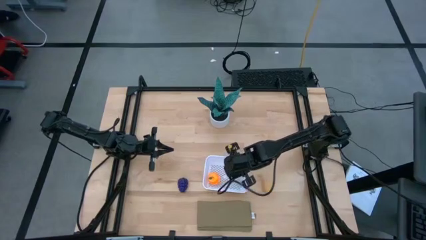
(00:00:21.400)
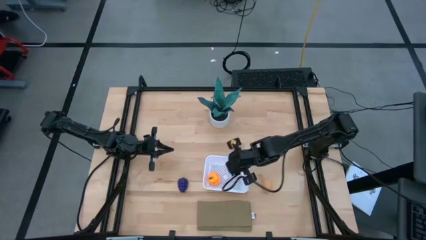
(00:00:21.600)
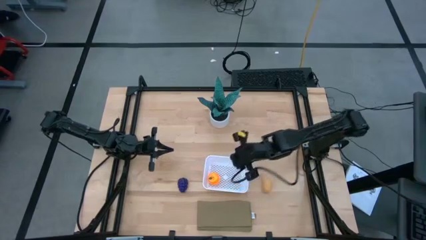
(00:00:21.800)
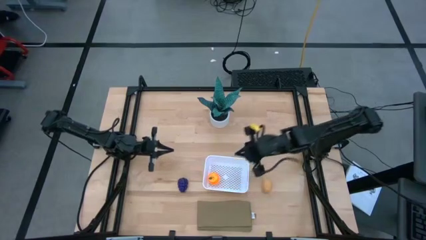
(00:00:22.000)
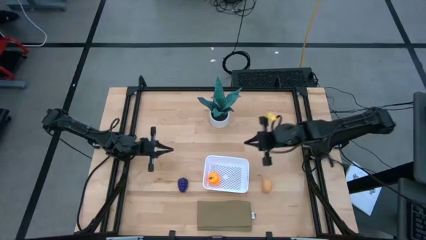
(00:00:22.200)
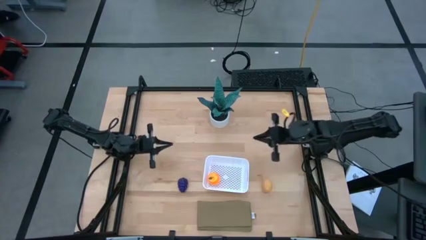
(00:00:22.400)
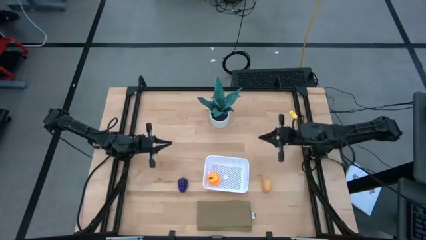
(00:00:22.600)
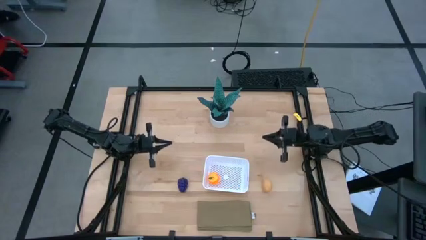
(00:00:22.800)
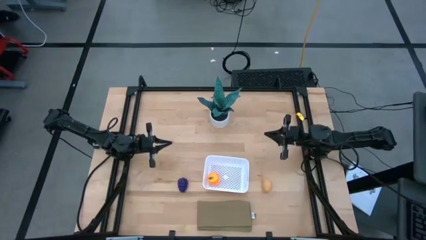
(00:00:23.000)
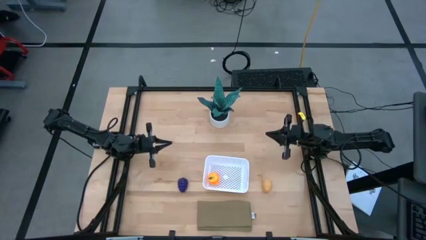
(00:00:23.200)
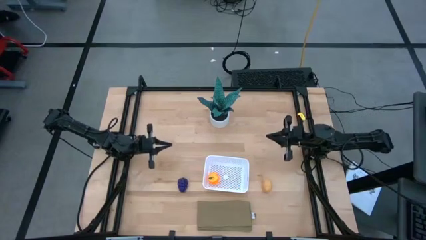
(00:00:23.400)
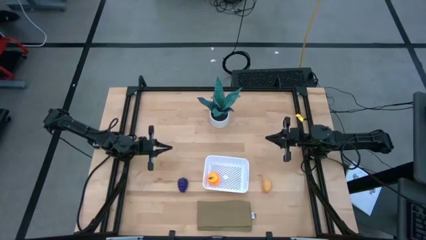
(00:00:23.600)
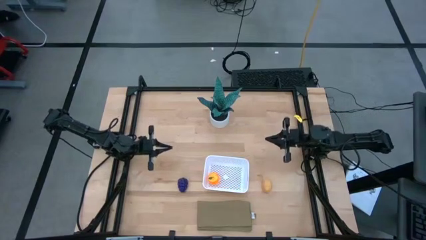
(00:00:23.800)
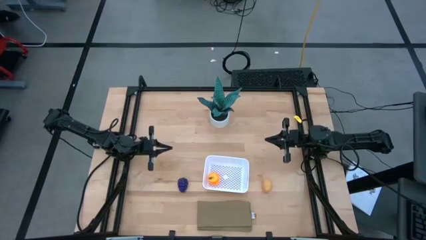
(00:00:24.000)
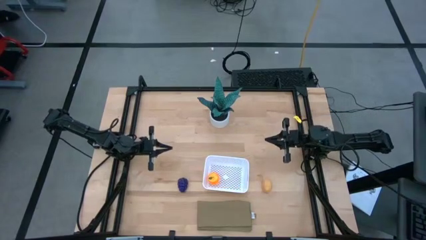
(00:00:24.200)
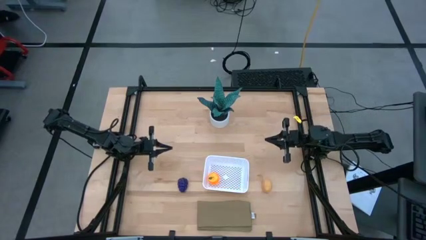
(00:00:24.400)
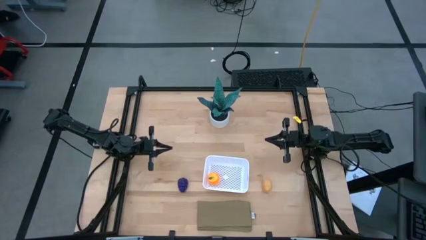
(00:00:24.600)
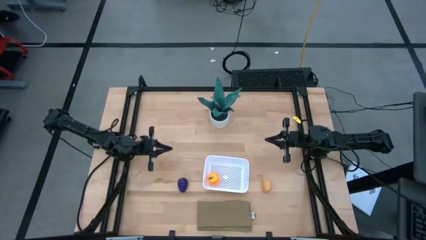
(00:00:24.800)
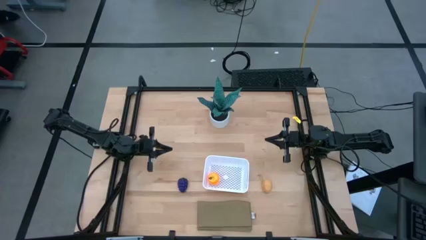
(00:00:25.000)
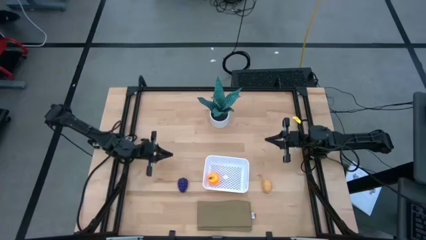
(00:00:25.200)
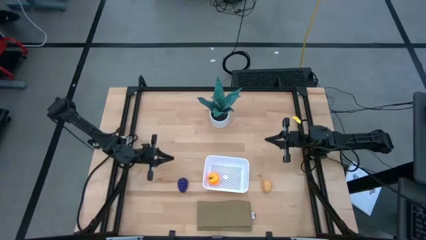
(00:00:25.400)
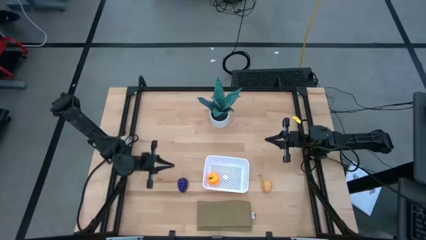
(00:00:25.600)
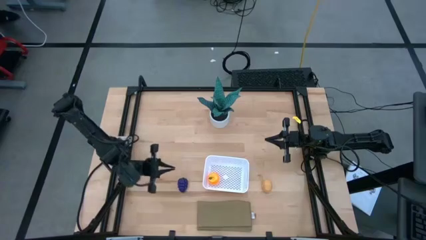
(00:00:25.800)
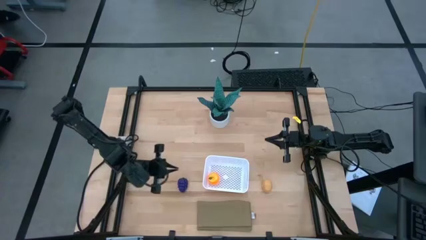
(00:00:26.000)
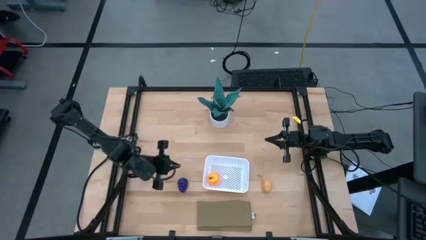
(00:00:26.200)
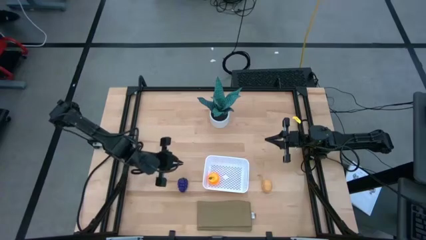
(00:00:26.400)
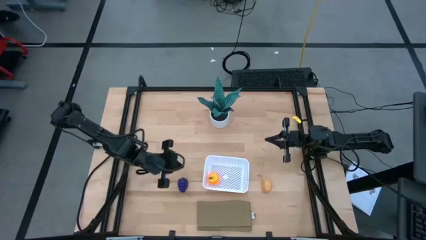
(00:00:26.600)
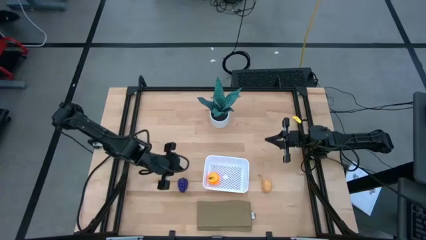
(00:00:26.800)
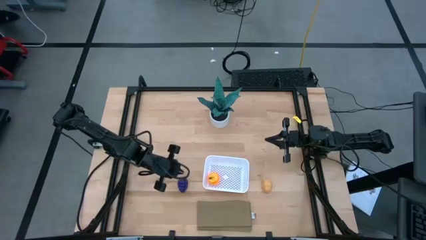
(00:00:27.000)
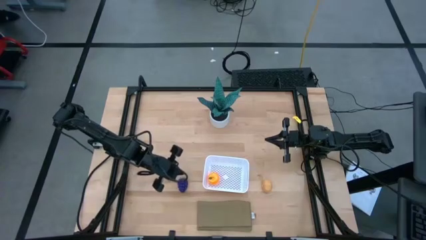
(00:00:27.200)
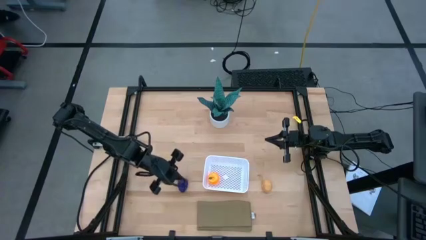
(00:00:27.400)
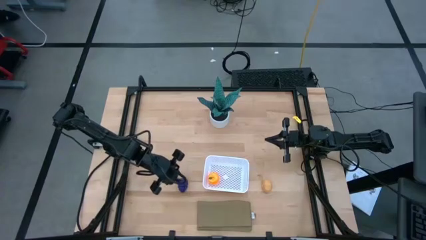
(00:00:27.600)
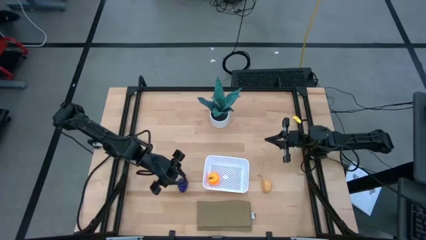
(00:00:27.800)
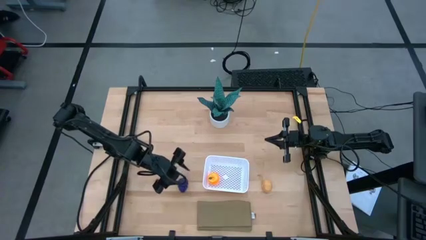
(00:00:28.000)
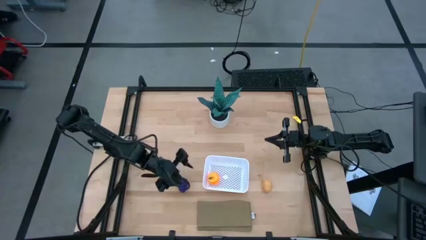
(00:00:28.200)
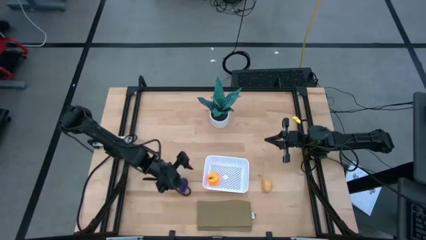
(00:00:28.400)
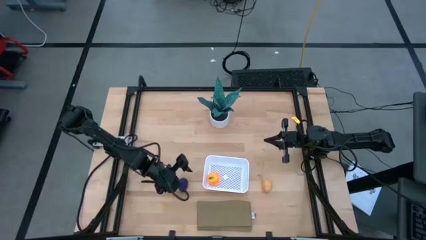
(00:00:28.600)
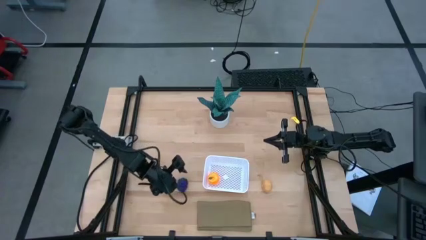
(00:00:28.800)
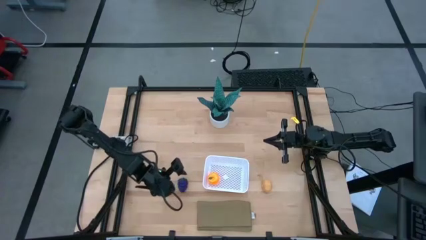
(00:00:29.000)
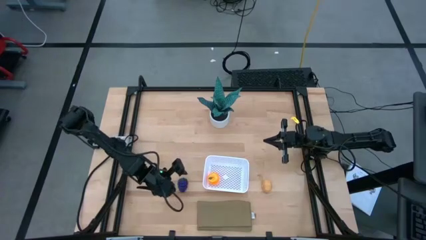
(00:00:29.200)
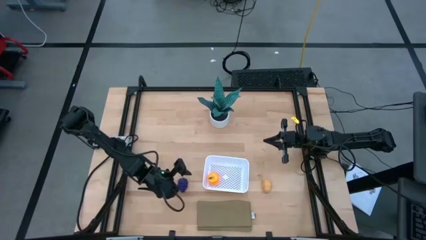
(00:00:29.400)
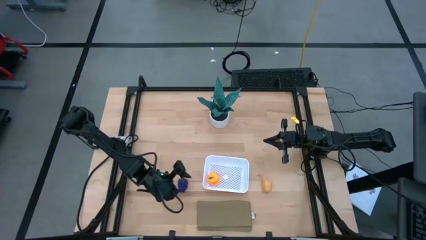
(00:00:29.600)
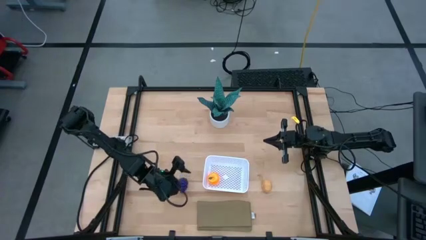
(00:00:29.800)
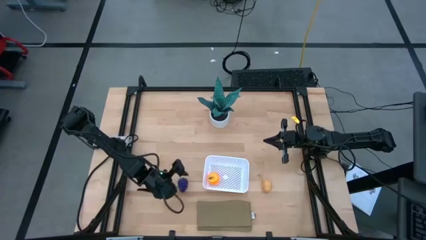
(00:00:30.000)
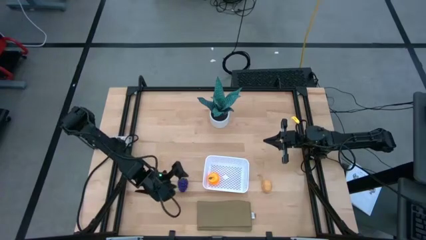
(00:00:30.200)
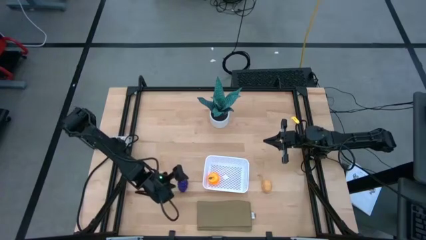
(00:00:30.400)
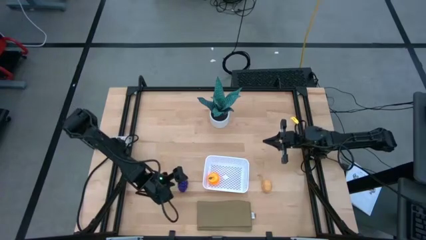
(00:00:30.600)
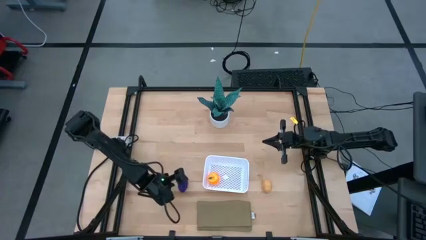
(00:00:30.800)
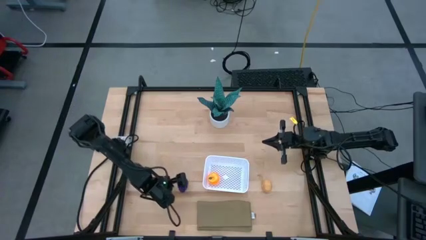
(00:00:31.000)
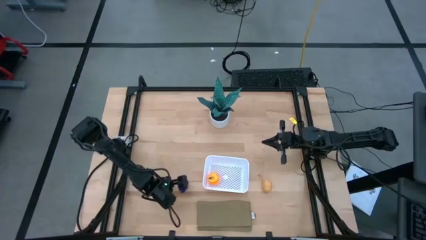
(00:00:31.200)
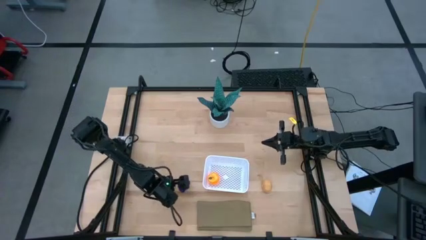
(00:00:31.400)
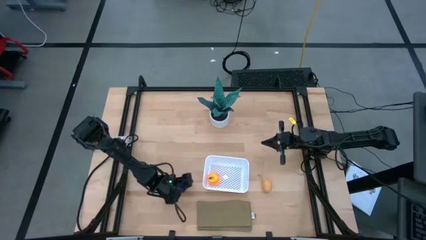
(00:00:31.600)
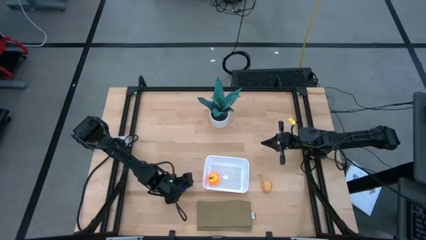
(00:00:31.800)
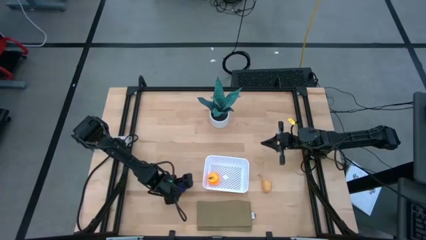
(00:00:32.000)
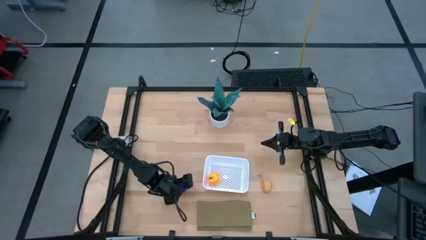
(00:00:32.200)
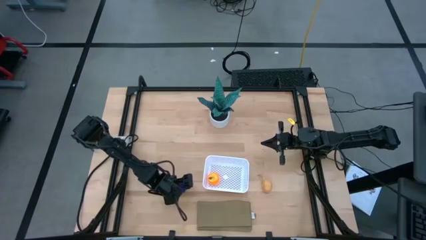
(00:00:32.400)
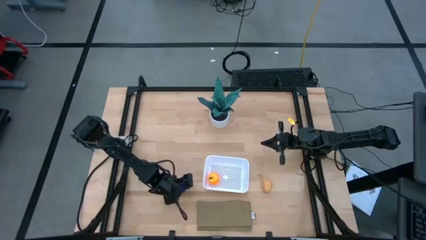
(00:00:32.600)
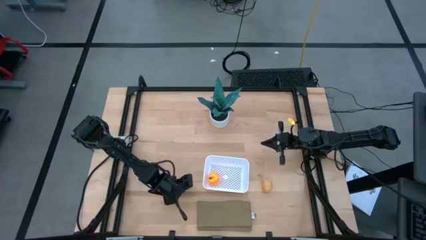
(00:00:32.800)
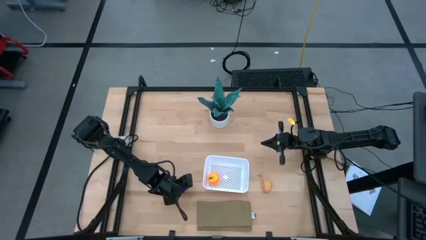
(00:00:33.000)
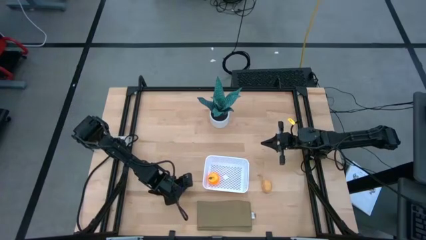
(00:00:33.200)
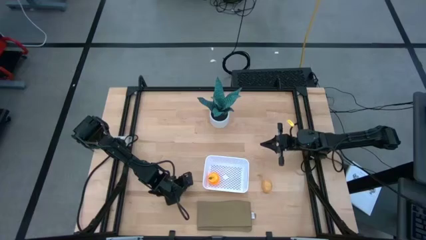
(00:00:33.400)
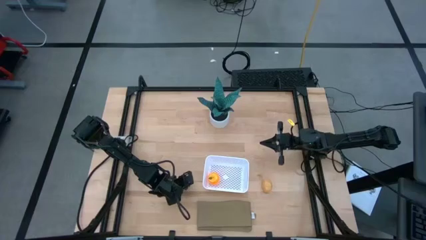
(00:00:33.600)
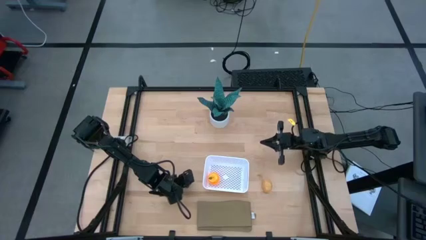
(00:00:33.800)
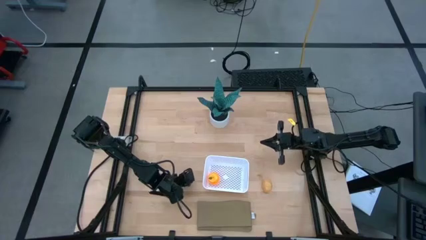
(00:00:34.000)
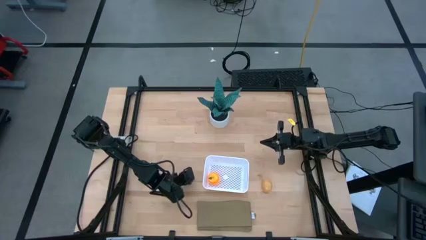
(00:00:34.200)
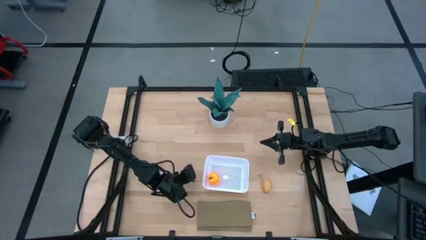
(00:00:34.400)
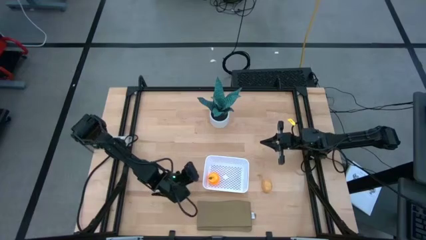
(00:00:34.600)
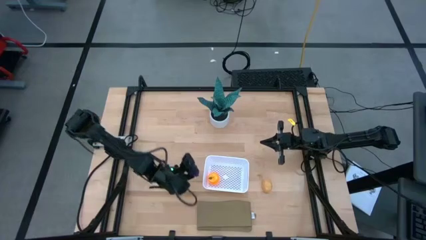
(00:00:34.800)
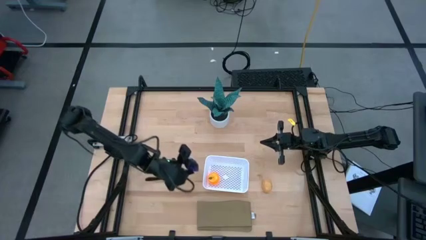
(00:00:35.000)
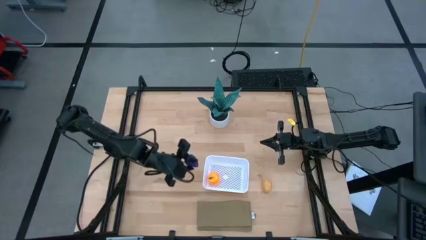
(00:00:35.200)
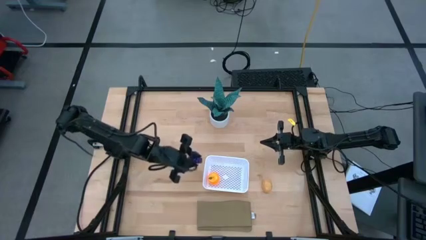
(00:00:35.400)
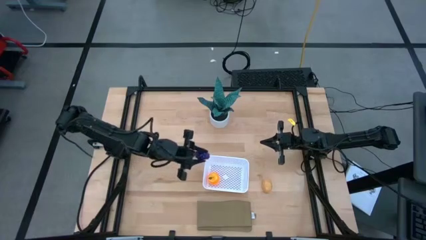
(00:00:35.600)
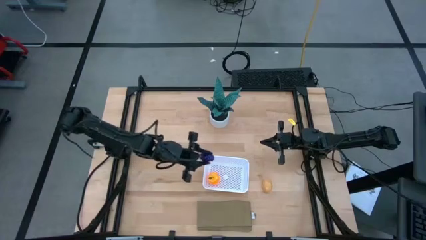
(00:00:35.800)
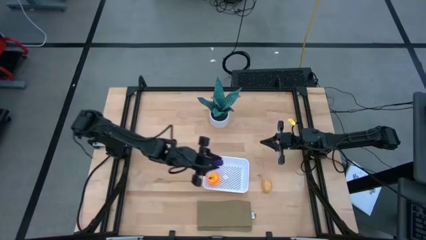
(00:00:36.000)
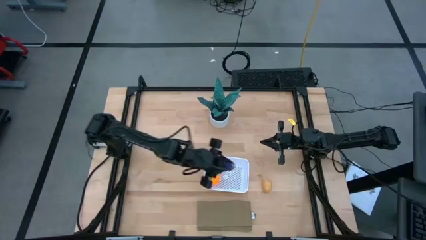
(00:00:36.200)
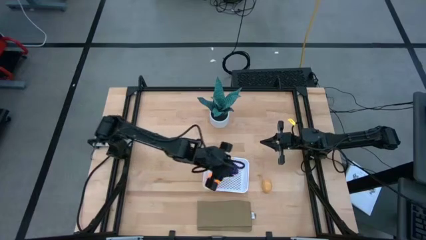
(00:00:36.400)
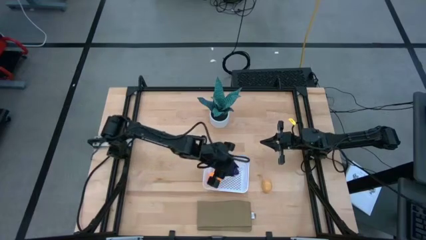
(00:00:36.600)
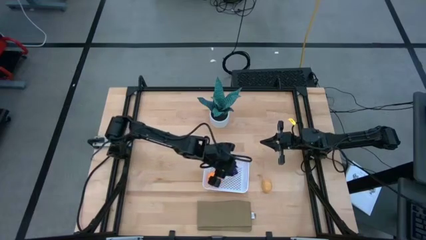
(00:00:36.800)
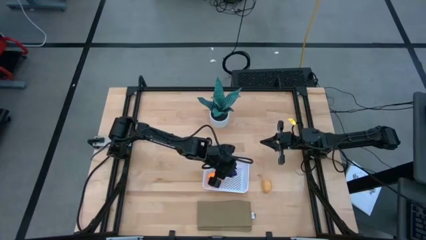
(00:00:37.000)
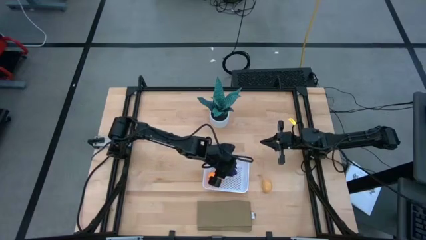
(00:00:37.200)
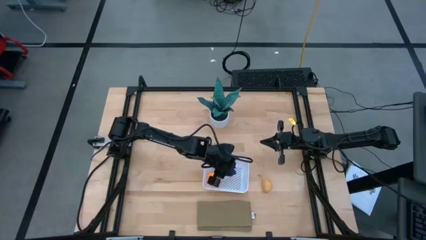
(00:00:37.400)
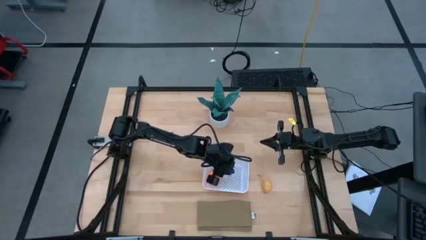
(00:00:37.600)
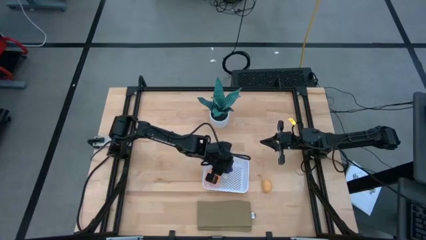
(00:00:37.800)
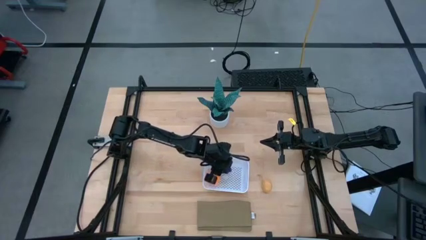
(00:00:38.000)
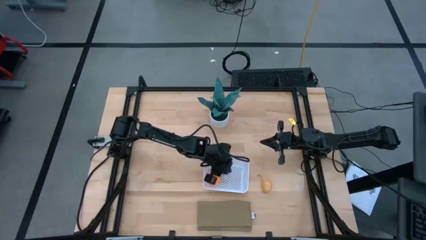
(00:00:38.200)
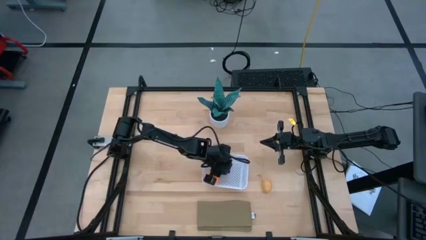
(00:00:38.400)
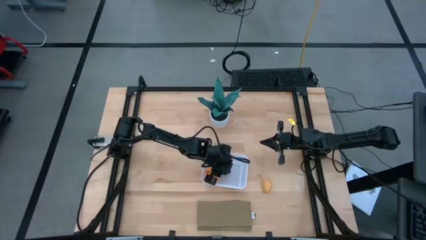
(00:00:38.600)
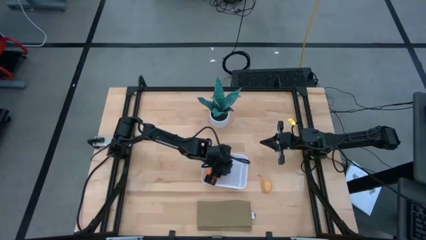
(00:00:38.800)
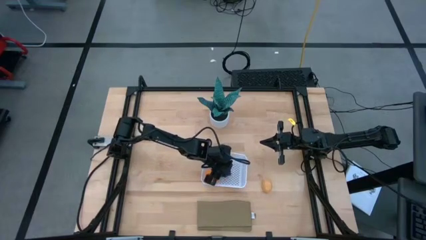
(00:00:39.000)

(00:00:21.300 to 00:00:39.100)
Task: Pick and placing Produce into tupperware
Put the purple grapes into the white basket
